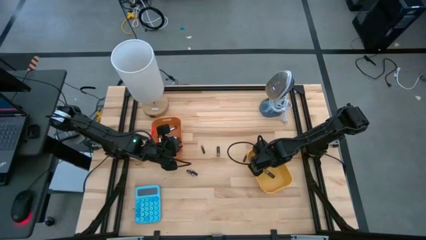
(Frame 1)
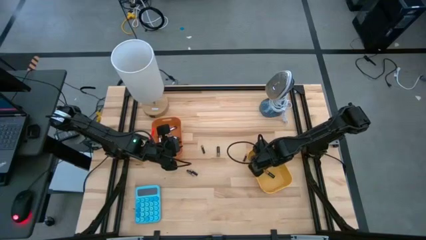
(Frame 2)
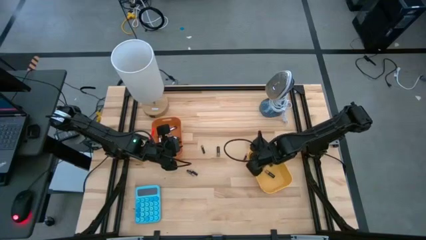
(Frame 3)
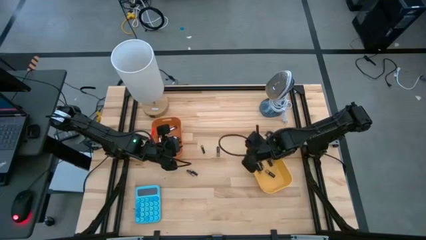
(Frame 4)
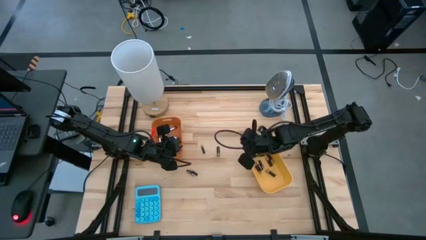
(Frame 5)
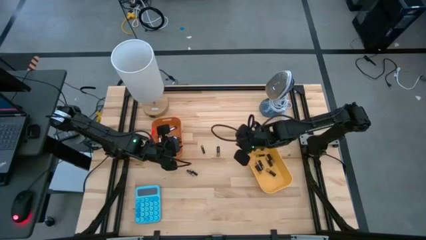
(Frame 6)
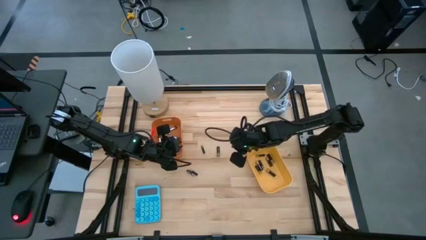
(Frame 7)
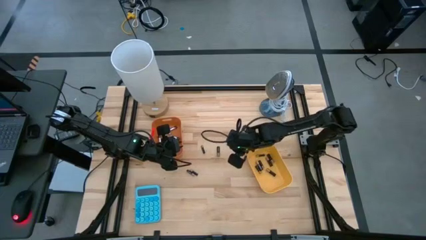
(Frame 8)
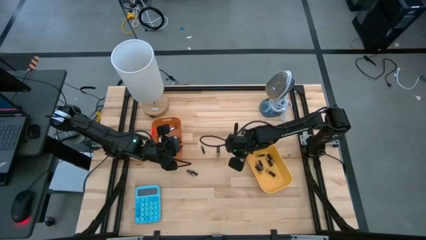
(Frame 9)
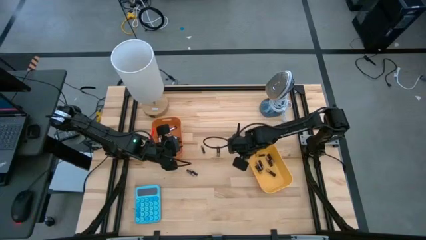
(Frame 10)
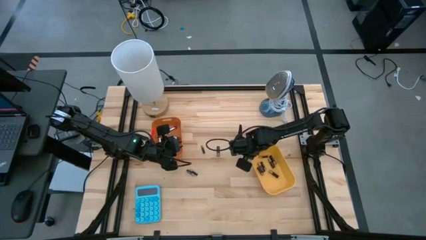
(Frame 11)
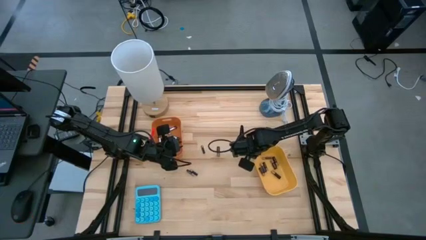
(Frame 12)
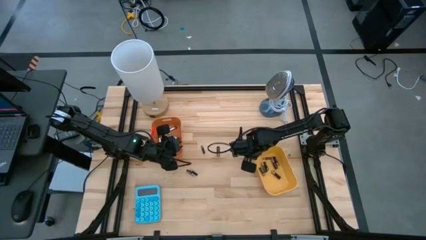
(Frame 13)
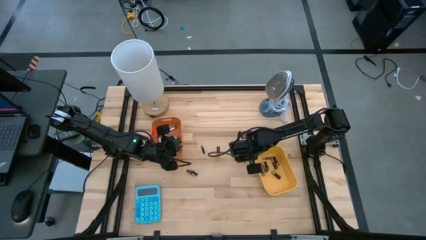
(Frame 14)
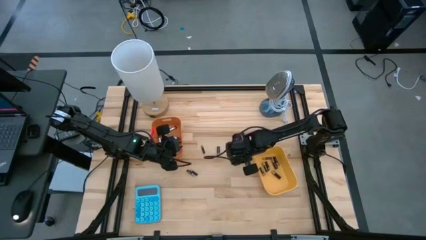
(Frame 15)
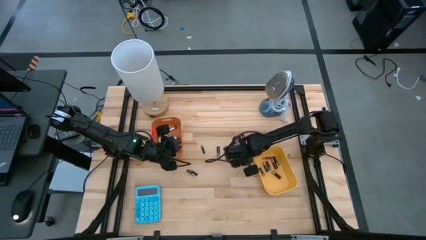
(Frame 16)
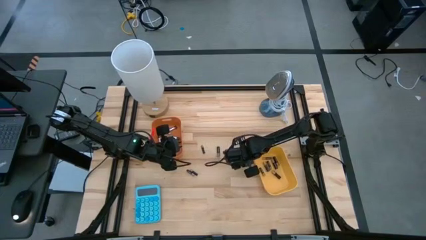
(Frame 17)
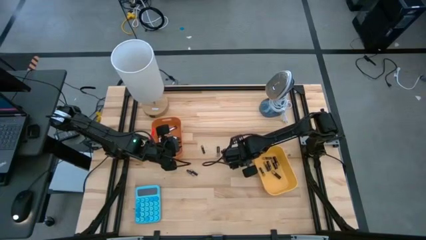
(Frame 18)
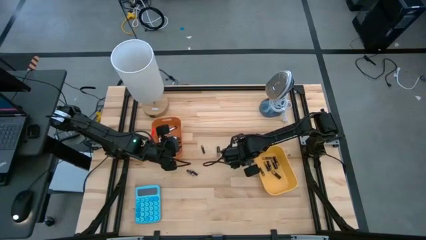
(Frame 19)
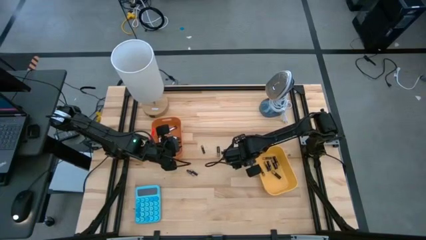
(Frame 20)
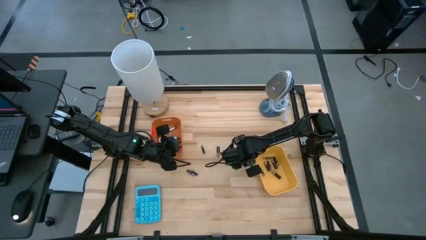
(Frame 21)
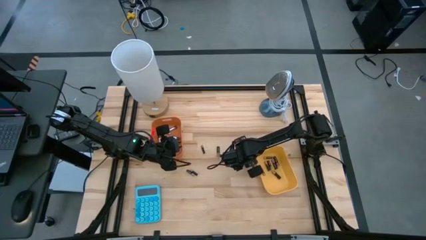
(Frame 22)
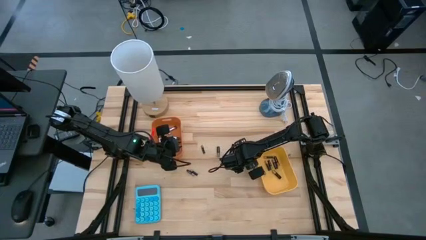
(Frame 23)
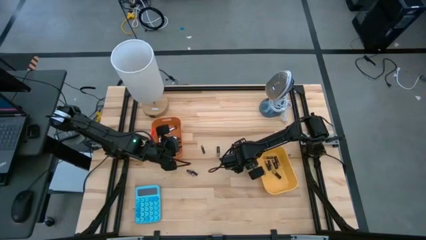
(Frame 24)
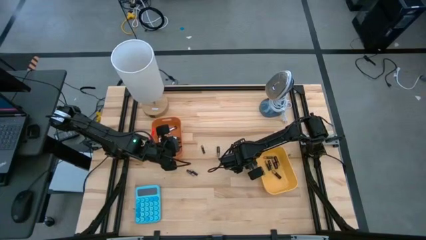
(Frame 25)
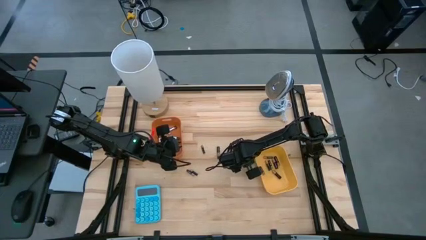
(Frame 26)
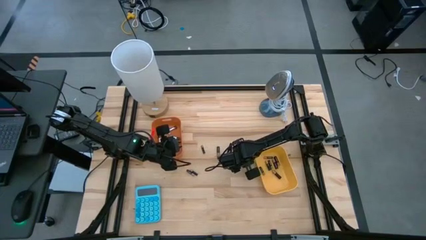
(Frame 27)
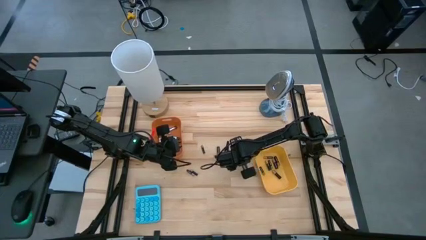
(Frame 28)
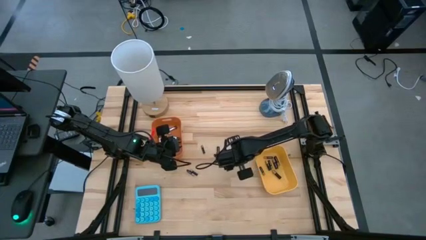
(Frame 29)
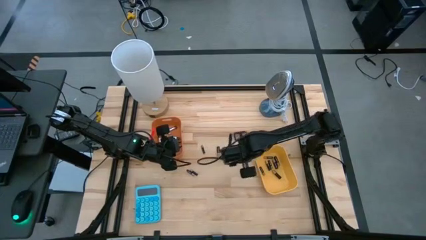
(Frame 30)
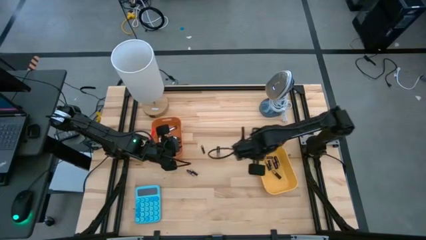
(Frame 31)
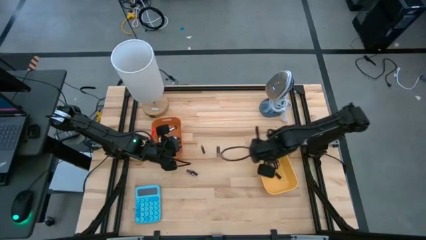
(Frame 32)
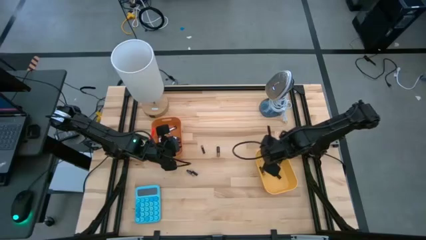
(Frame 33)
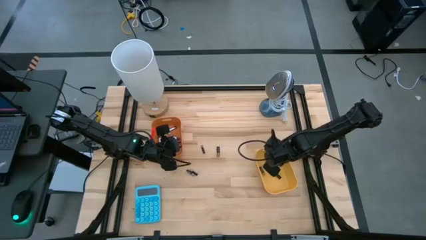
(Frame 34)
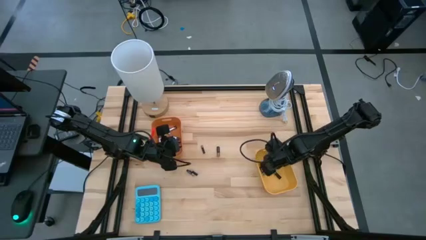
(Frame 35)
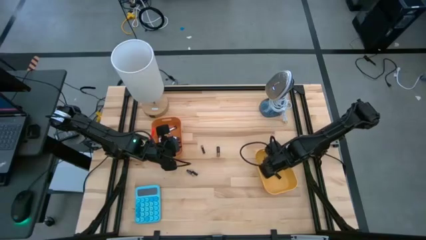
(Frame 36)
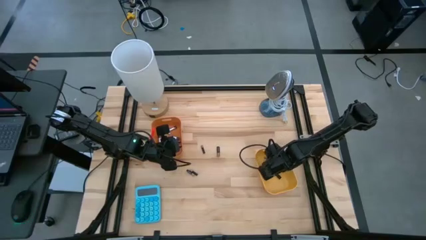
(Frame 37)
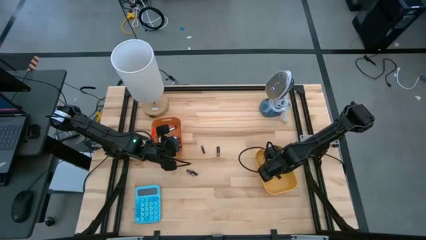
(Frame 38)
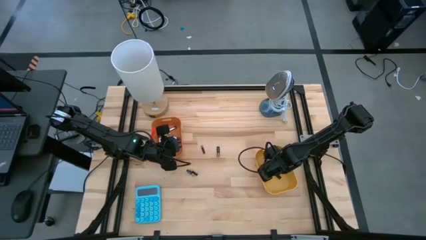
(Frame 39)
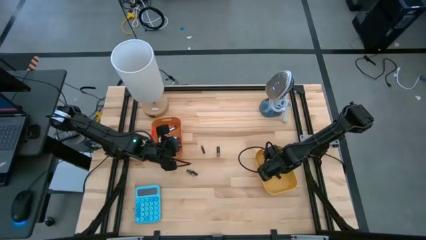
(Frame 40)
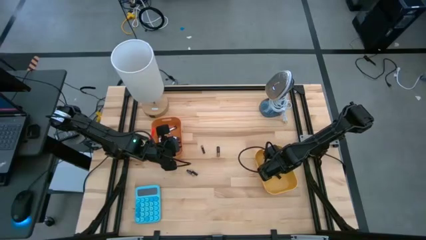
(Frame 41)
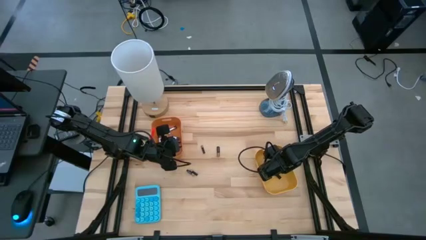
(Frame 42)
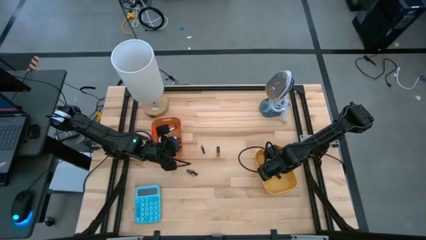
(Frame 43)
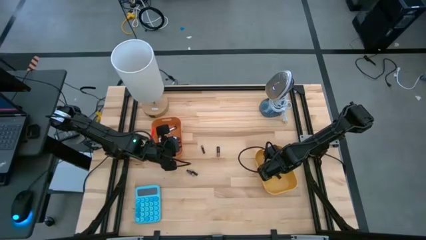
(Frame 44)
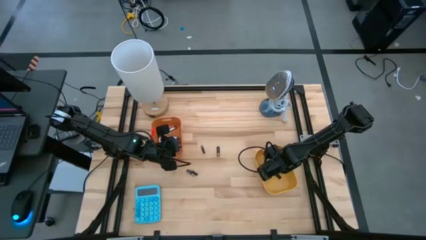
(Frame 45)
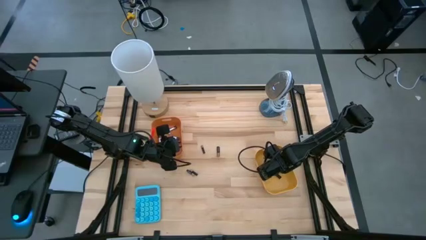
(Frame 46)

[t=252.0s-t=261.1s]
Task: Sort batteries
Put the gold battery into the yellow bin

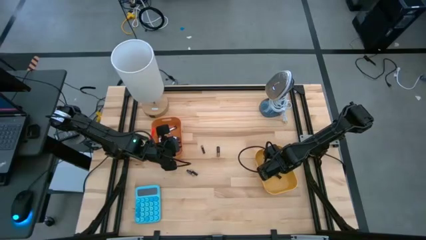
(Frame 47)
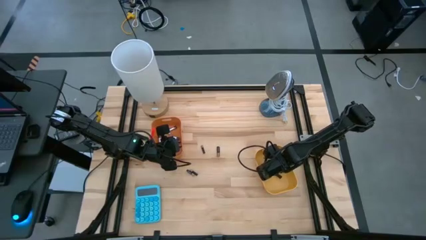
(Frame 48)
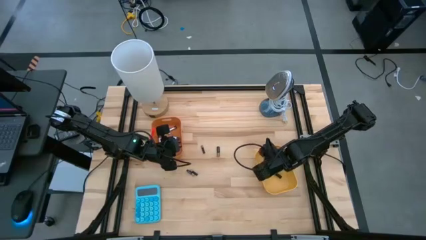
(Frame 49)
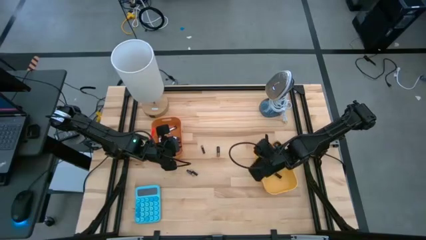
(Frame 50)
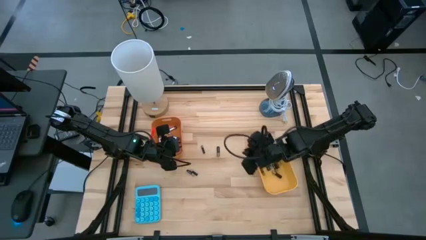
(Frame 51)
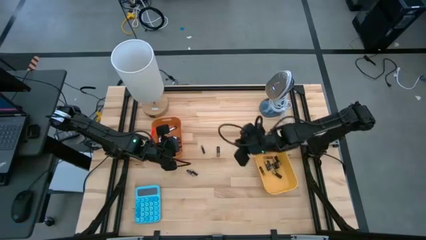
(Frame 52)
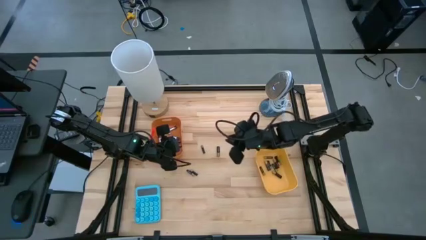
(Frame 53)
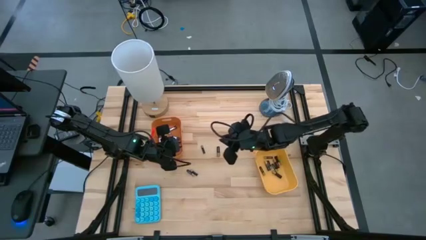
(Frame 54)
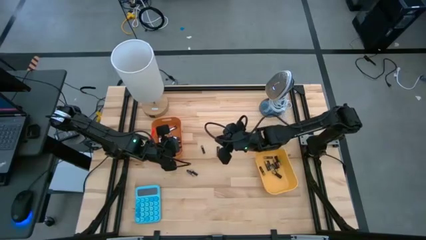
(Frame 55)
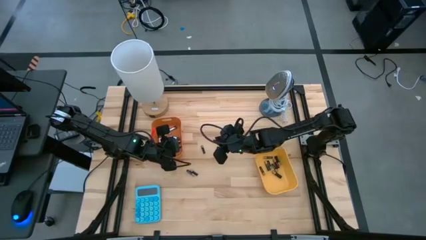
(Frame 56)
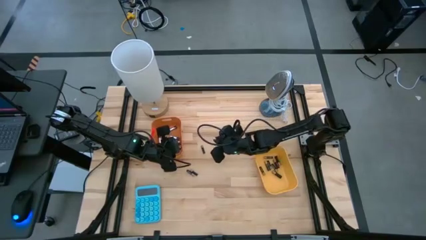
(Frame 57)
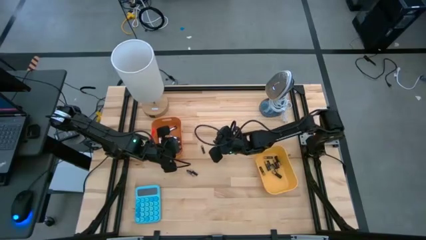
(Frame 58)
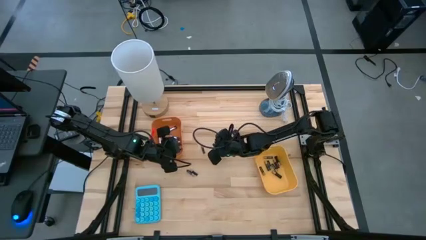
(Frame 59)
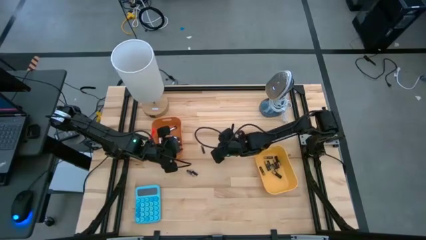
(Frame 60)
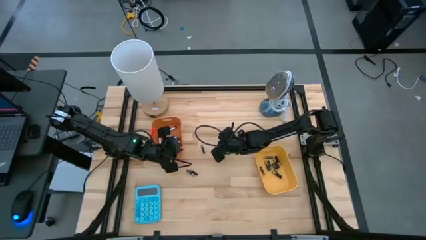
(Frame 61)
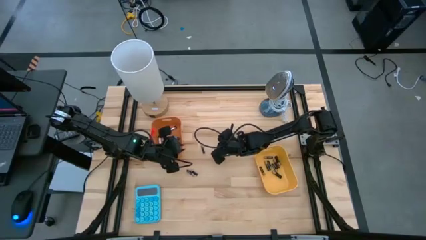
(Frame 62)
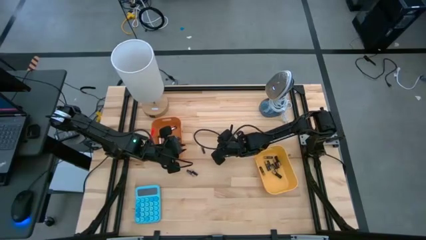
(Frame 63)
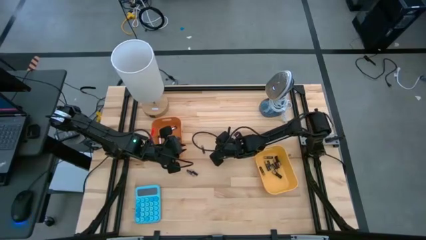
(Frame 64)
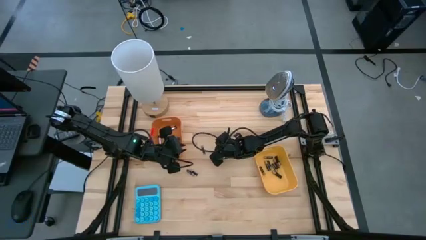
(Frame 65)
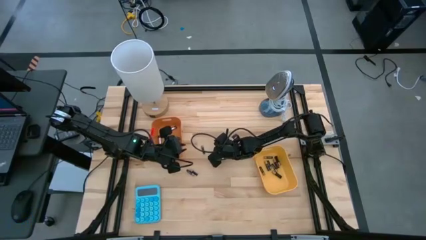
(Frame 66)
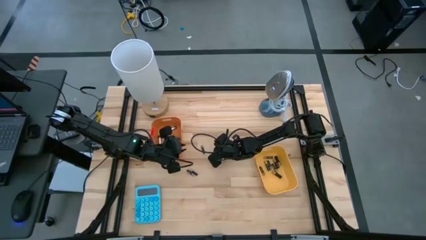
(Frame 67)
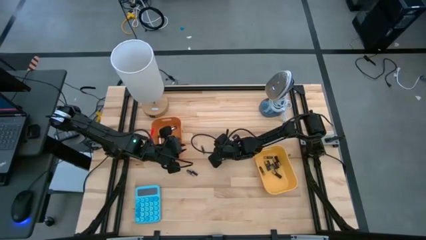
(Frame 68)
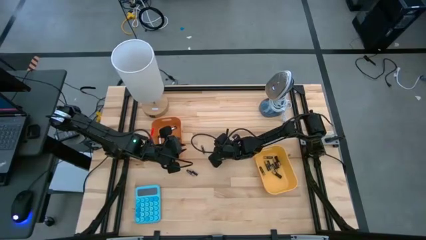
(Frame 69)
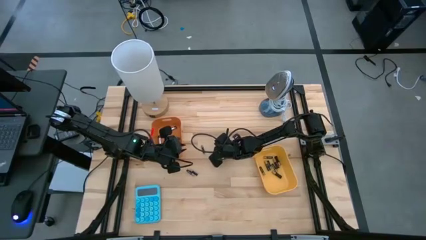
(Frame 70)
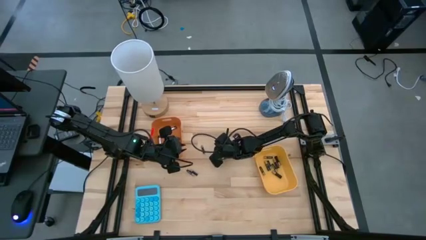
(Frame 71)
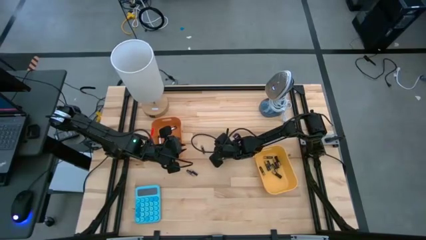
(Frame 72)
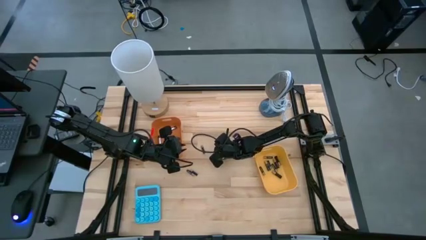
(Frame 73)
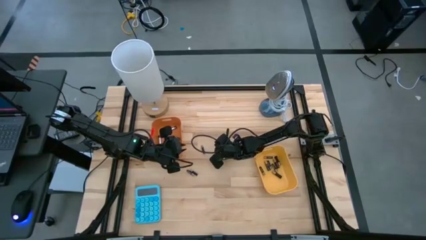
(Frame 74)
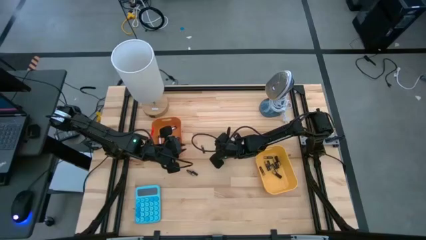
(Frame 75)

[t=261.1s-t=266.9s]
Put the gold battery into the yellow bin

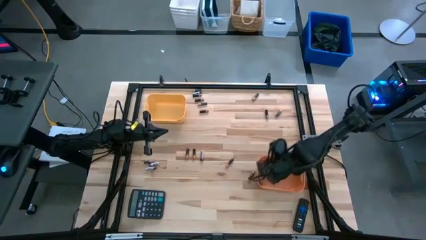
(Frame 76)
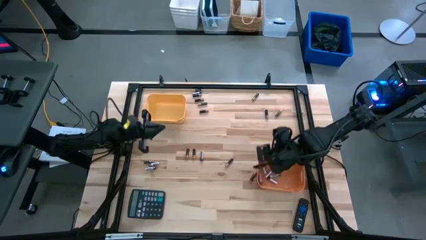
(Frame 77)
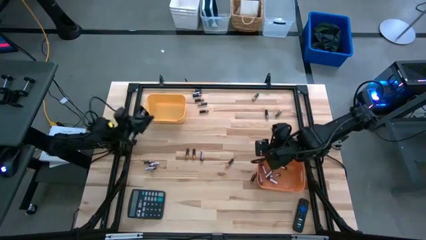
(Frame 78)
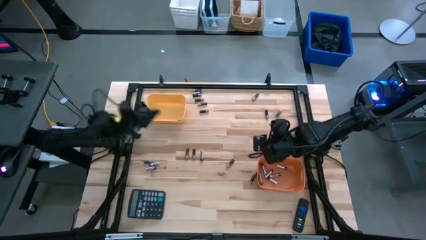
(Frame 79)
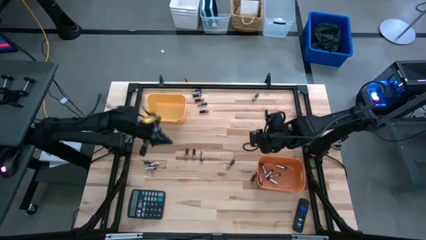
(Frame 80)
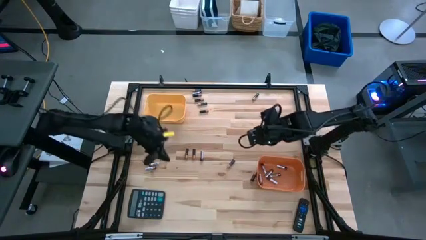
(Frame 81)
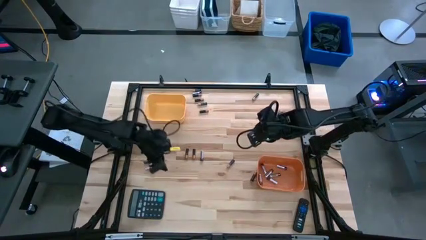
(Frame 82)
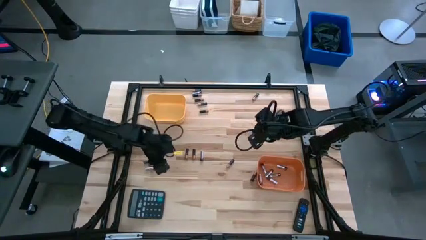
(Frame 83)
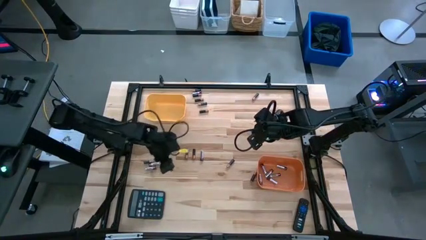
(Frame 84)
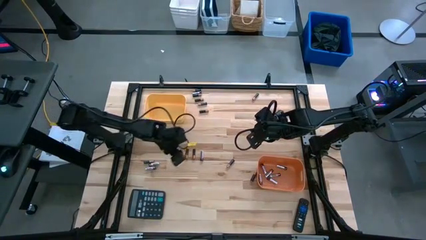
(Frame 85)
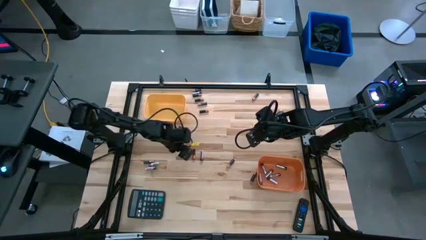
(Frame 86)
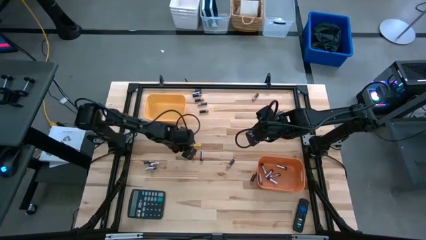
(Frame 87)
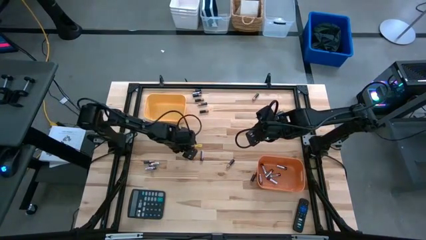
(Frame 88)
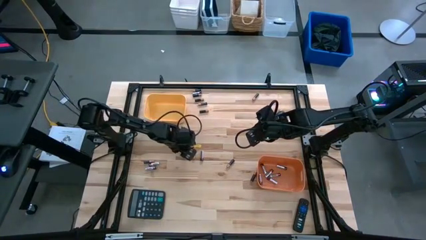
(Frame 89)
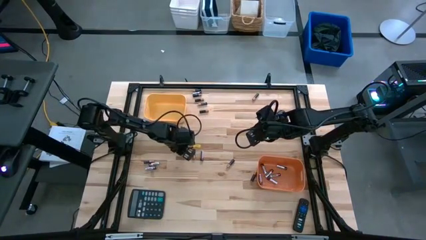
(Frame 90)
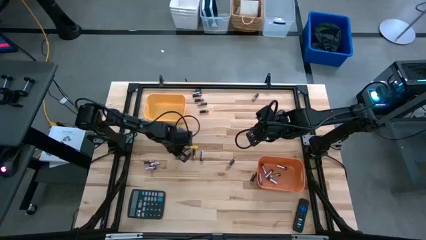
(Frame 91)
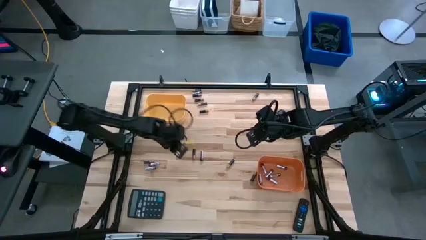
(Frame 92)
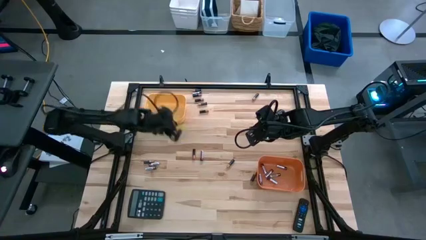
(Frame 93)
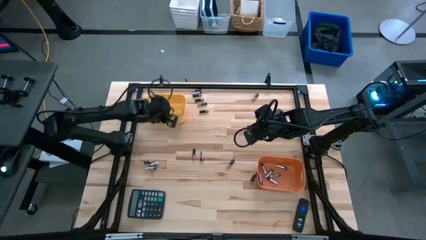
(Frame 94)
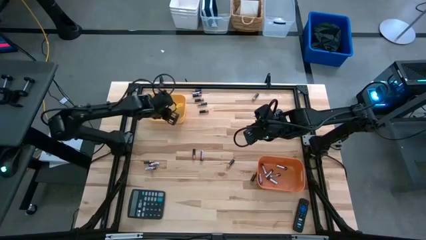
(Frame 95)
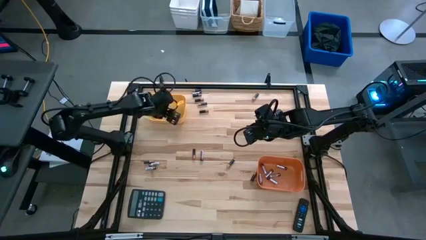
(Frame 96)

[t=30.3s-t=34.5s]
Task: Sort batteries
Put the black battery into the yellow bin
